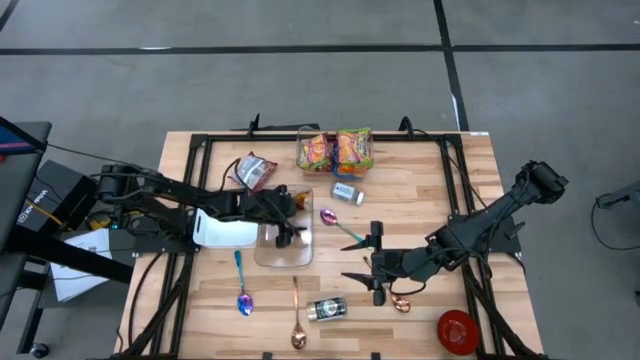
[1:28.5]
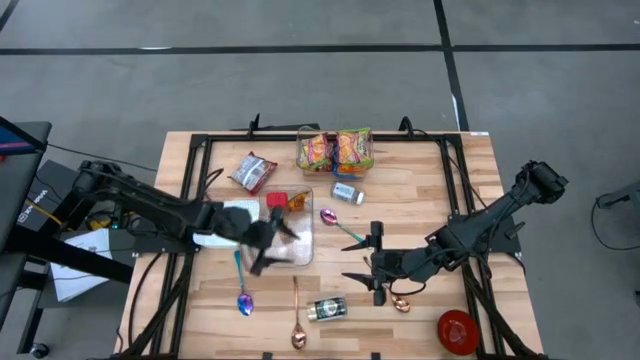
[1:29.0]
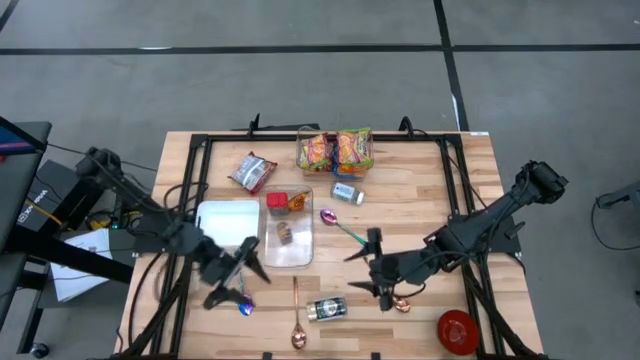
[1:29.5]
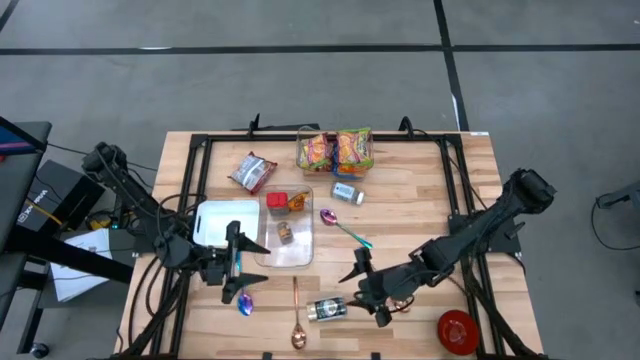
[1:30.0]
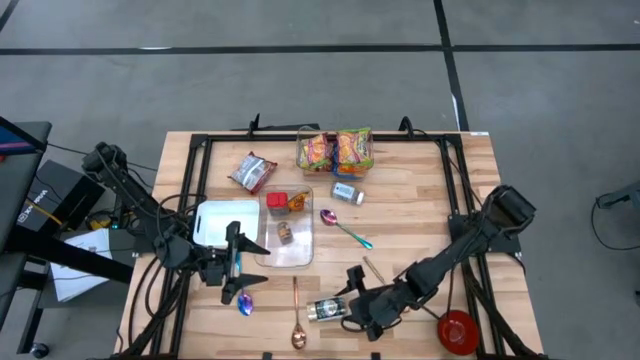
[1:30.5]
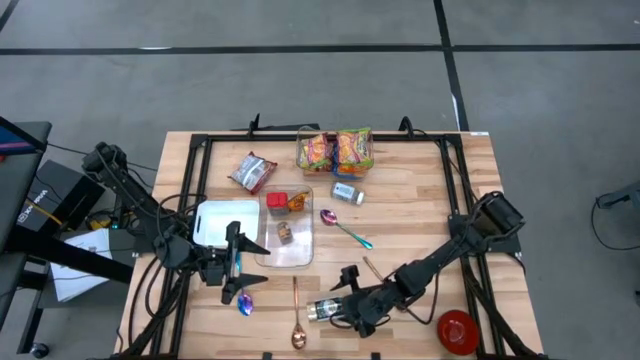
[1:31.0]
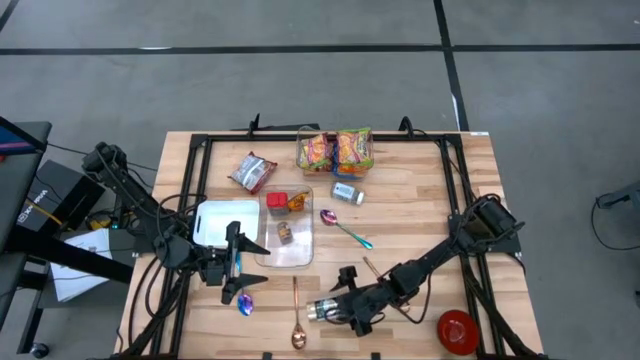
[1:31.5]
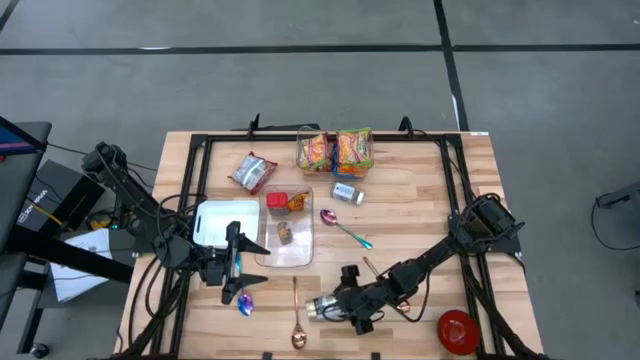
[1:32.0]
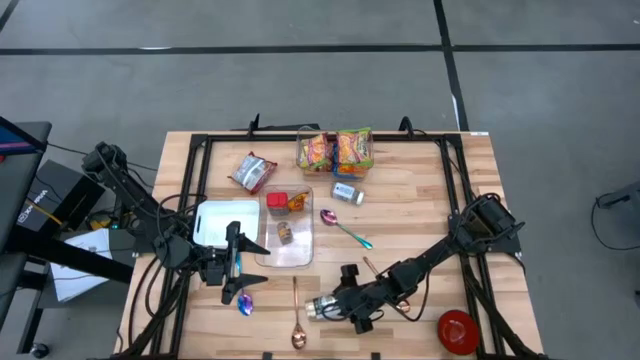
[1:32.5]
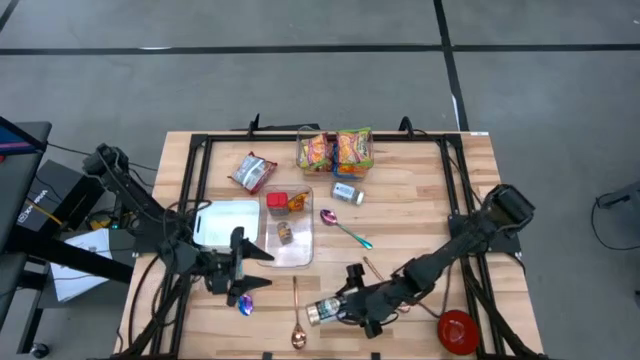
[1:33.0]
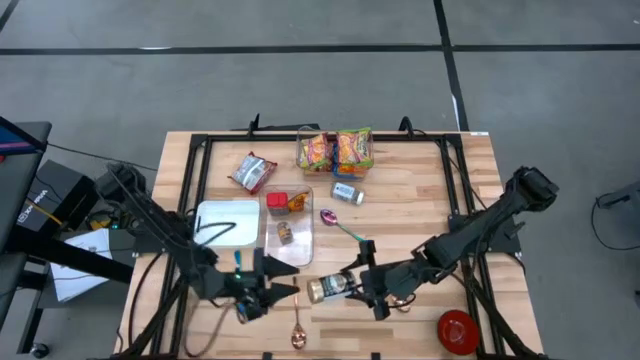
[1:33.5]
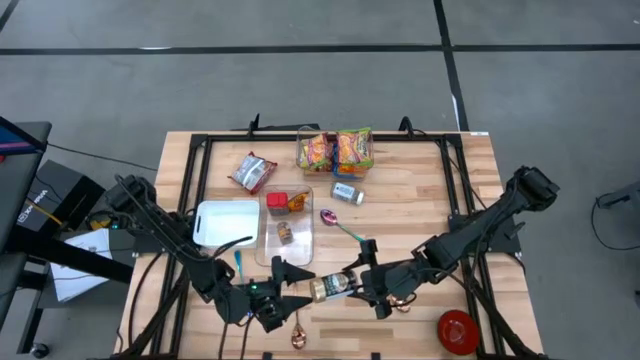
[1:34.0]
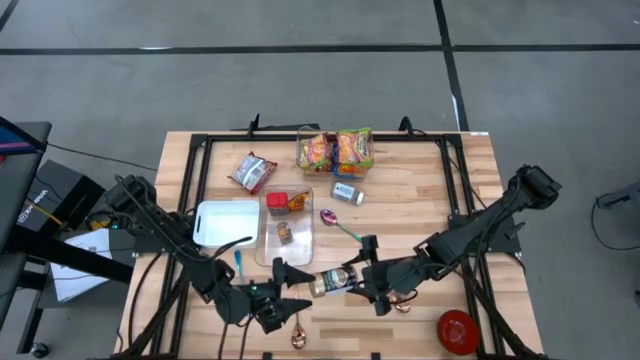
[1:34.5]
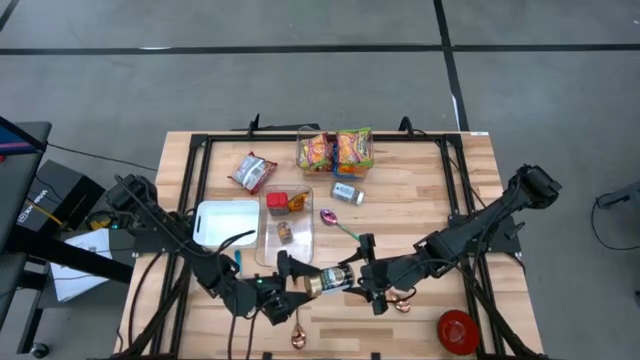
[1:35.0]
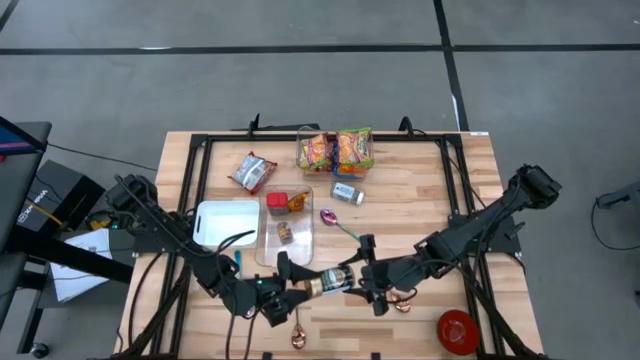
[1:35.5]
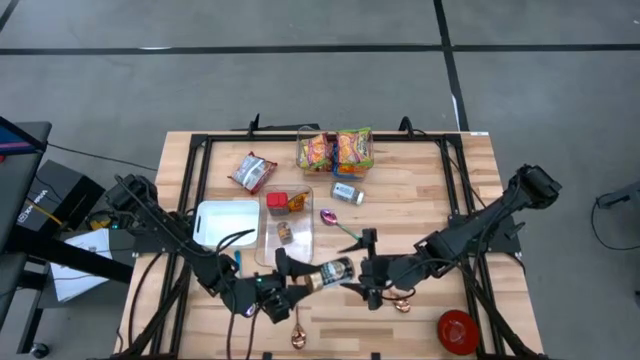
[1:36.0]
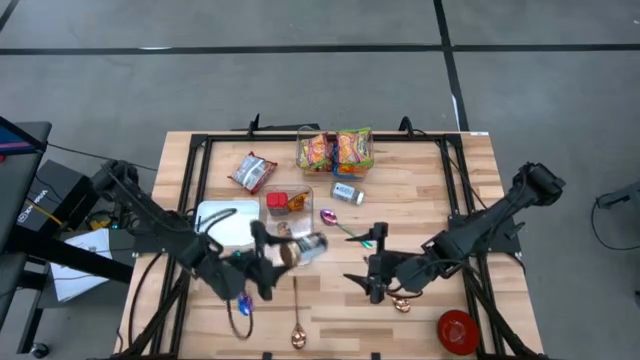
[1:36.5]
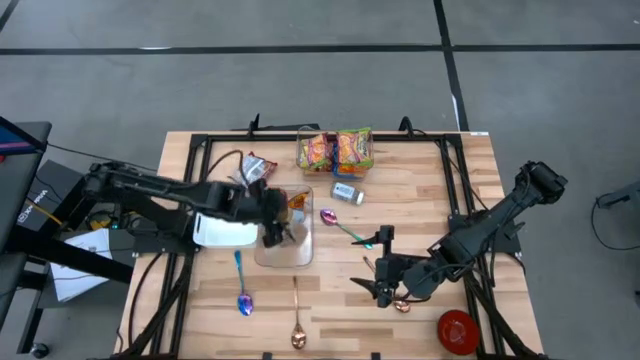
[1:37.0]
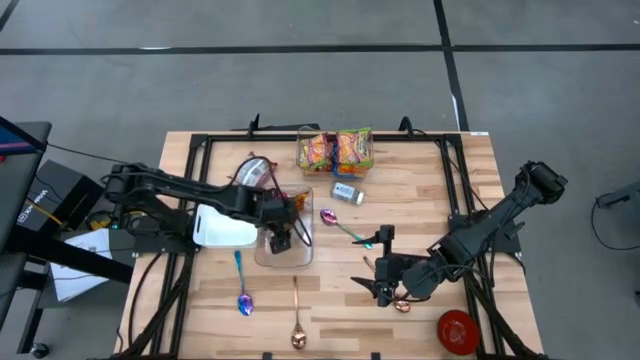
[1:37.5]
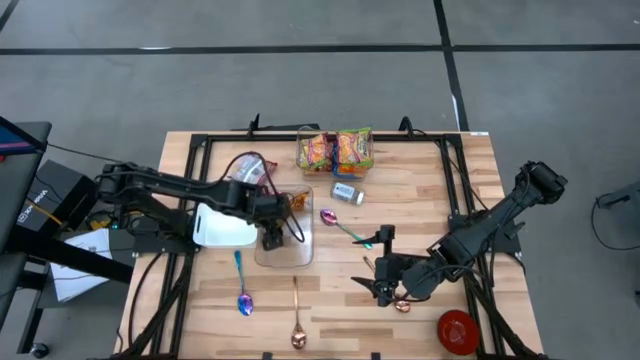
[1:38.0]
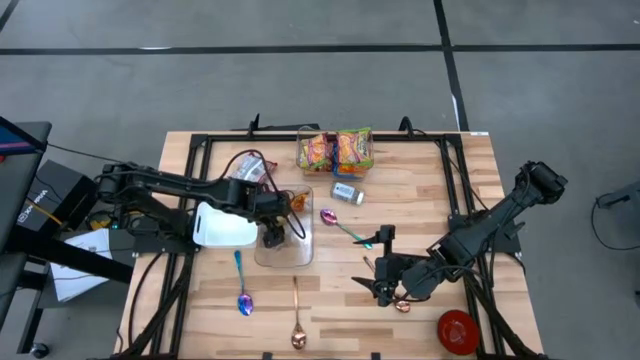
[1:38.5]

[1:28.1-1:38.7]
Task: Pick & Place Food Item
Put the gold seasoning bottle into the bottom transparent bin

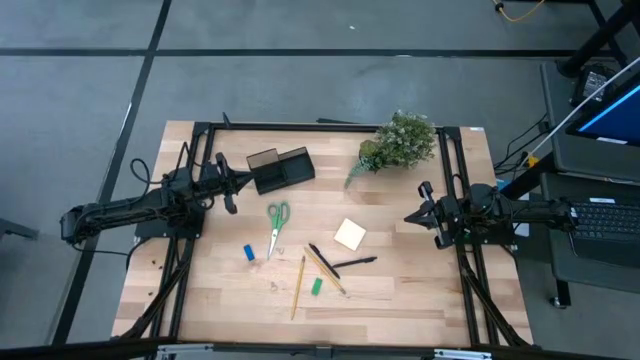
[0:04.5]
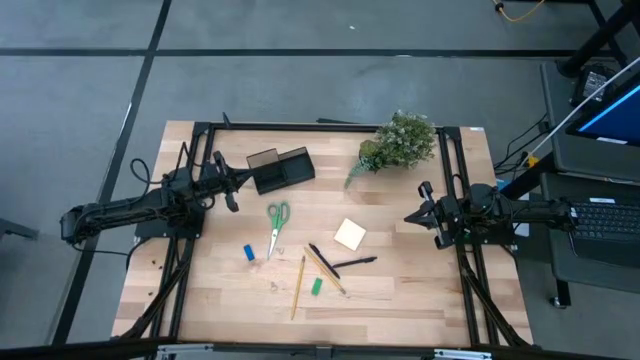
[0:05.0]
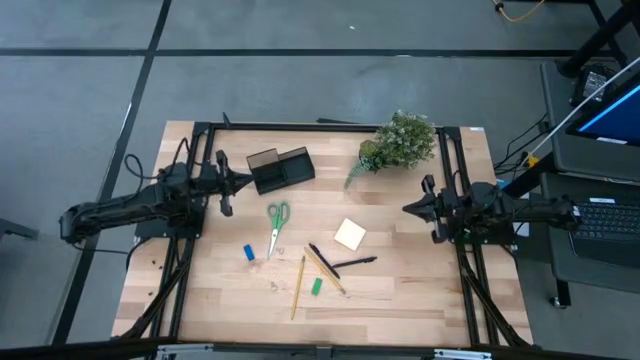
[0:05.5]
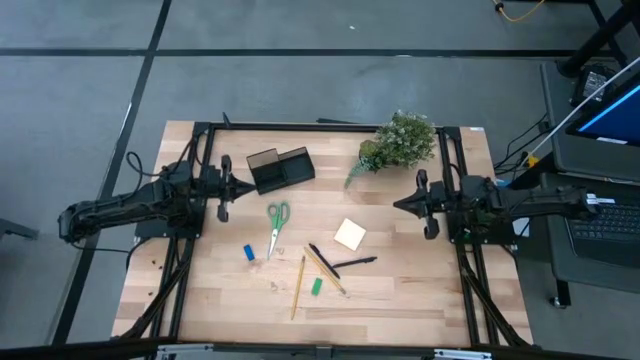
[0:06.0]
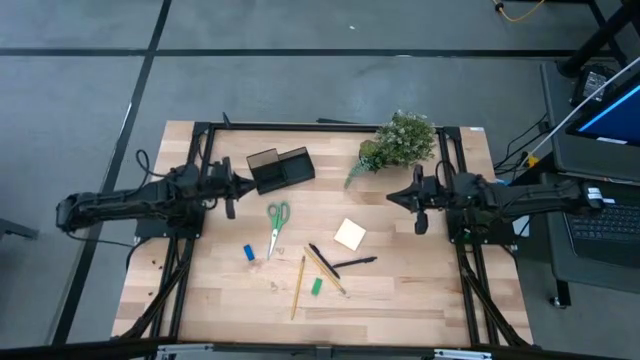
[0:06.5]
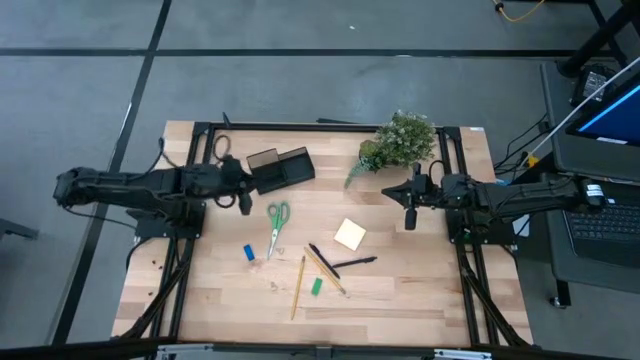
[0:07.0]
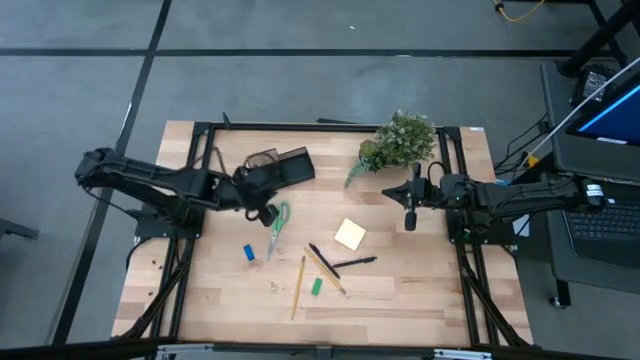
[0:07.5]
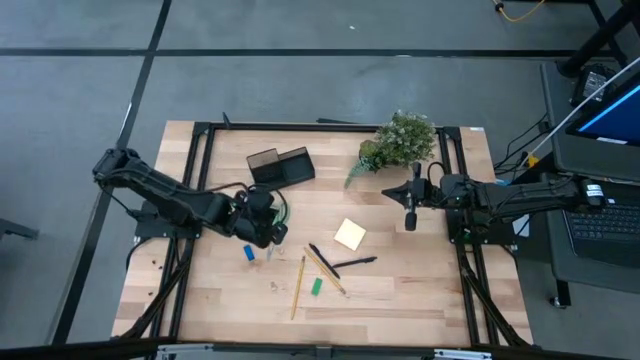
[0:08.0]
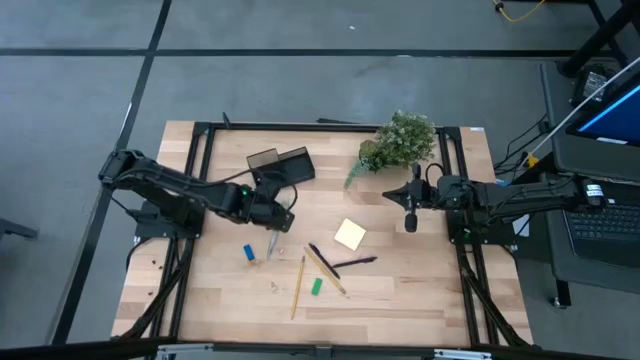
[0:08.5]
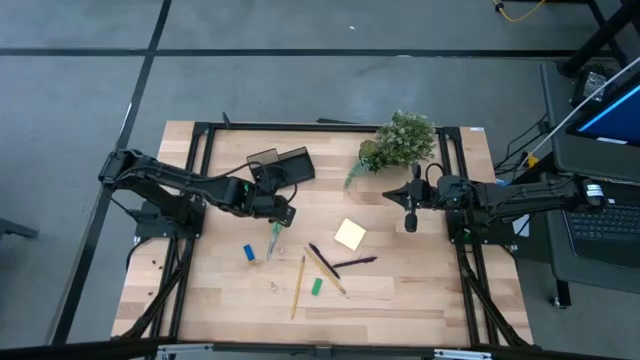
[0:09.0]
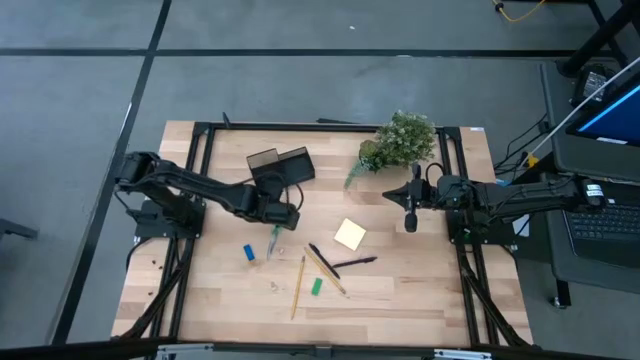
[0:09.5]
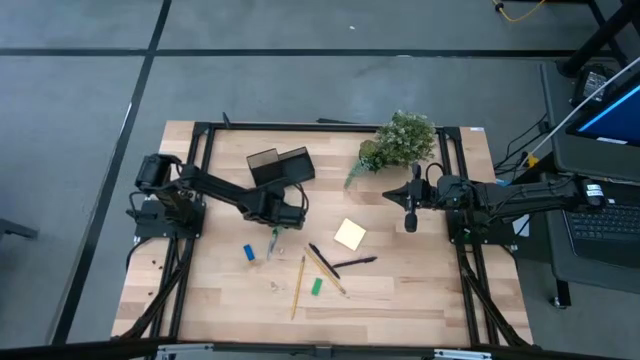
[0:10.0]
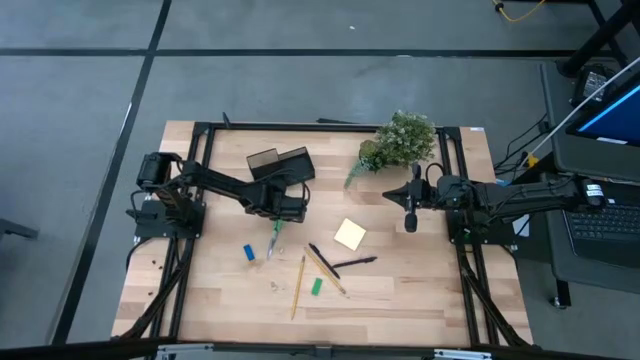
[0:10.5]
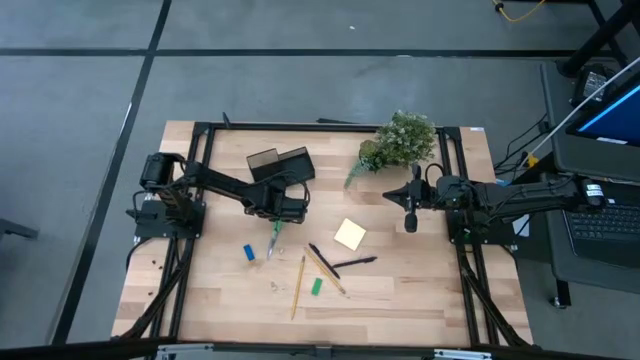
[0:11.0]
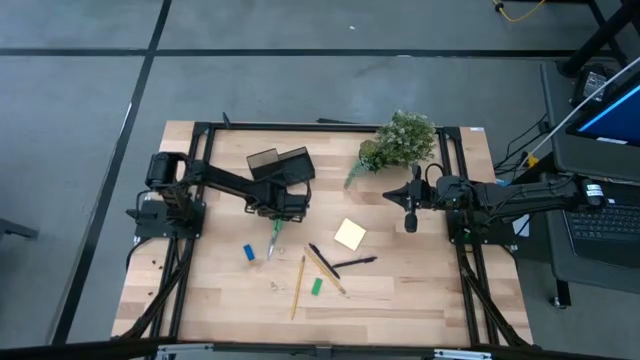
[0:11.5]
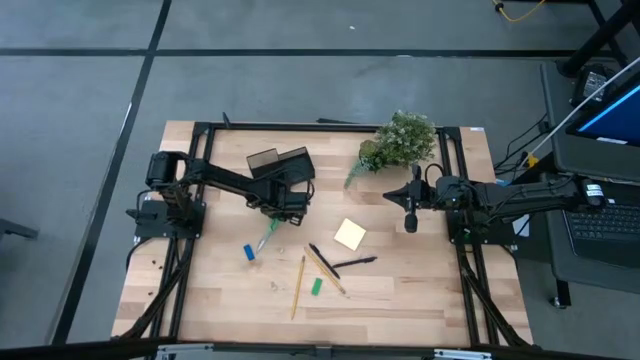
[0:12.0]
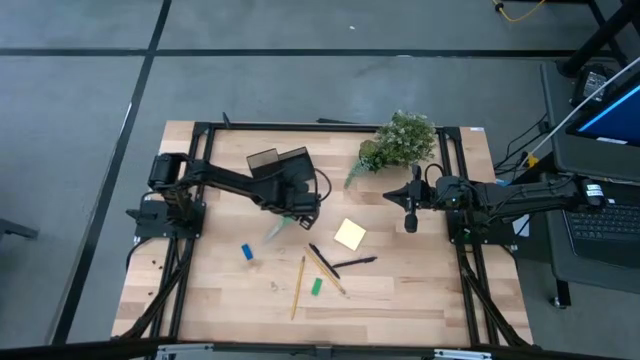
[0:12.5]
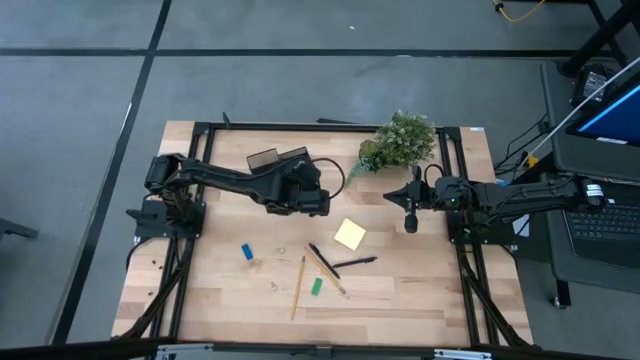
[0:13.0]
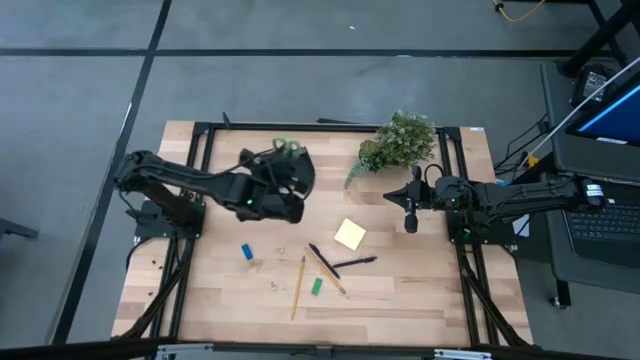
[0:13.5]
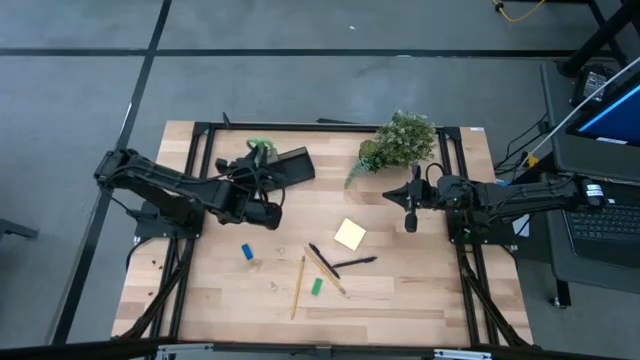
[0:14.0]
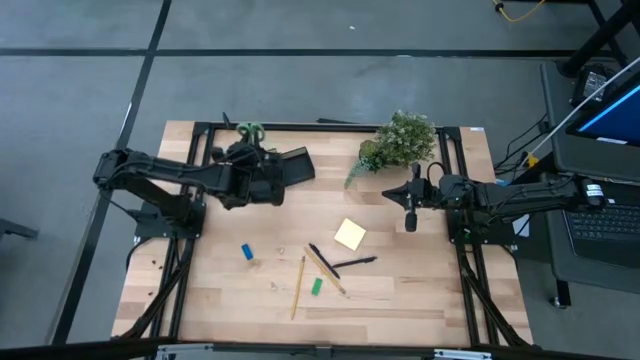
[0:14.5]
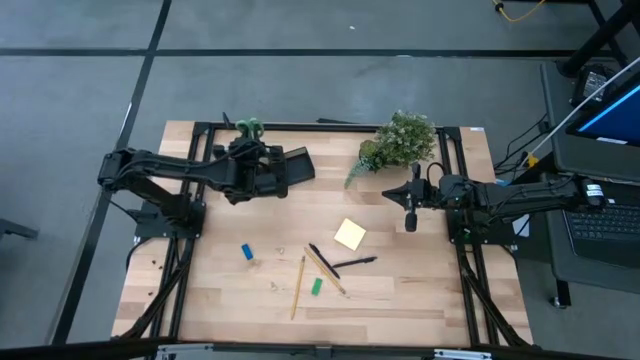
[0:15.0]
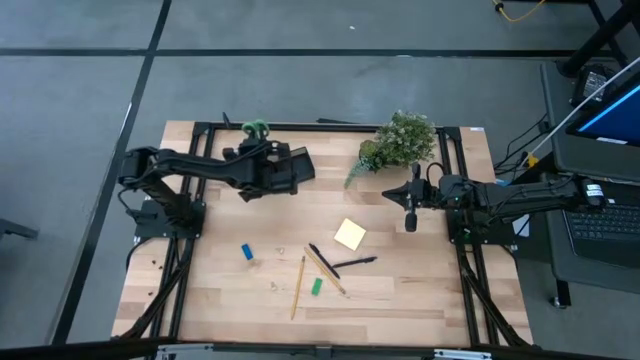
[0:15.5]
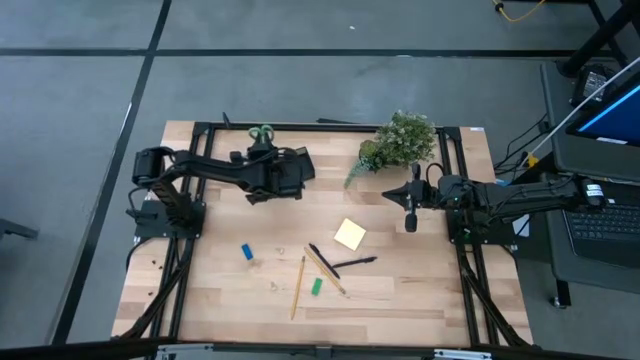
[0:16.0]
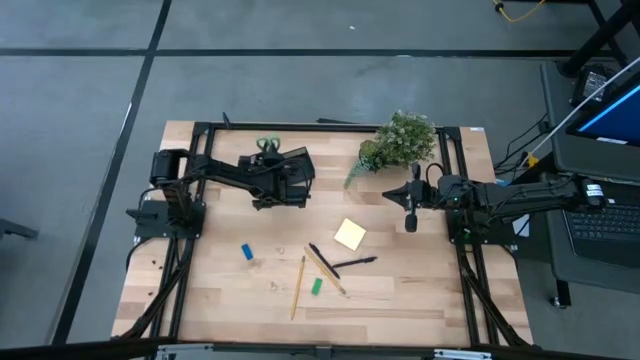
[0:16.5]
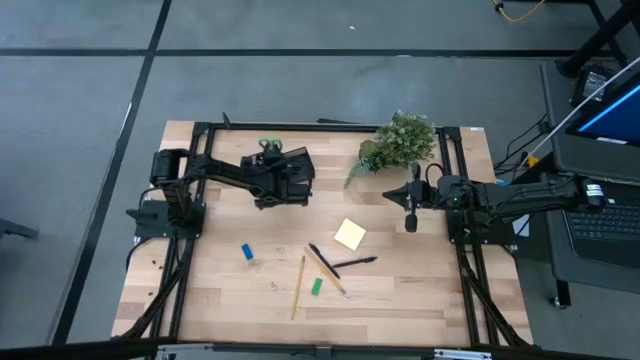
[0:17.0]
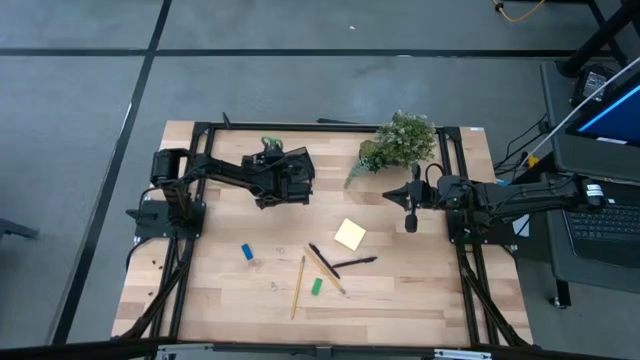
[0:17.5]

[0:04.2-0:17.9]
Task: Pick and place office supplies into organizer
Put the green scissors into the desk organizer
